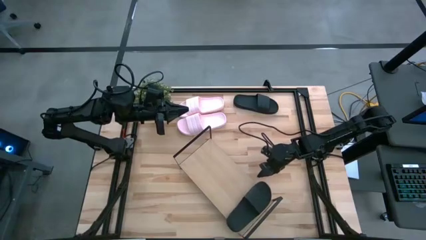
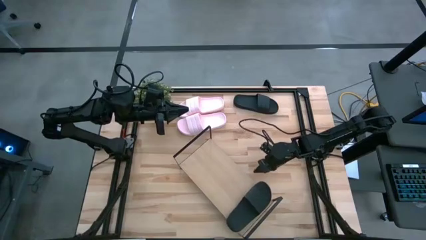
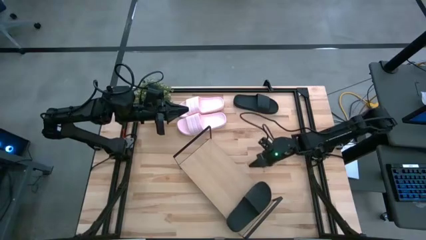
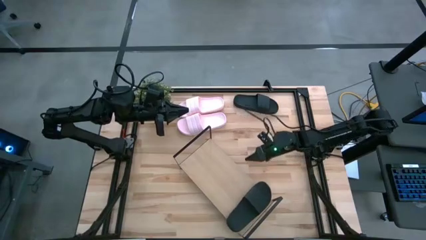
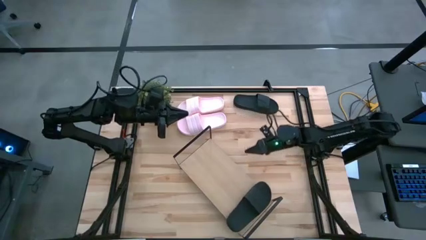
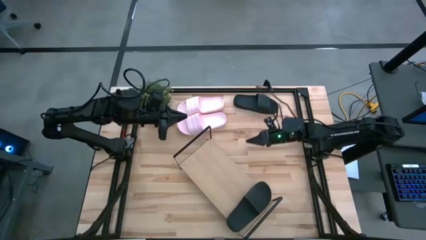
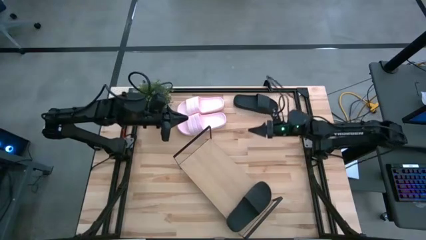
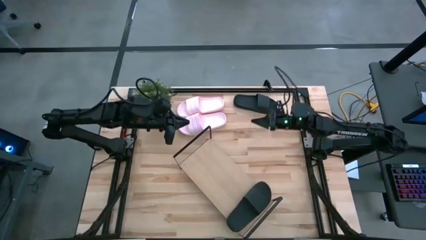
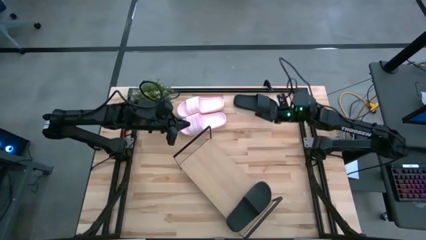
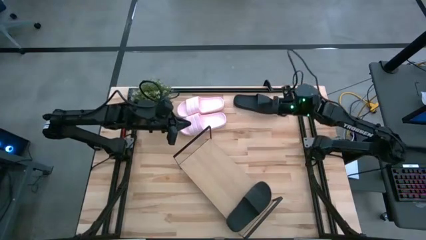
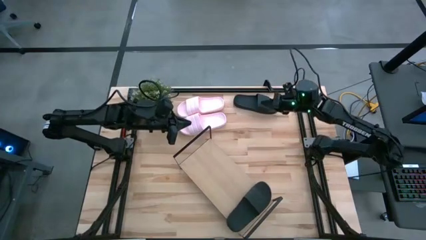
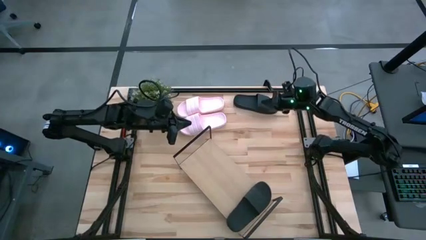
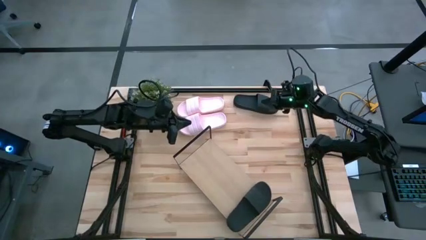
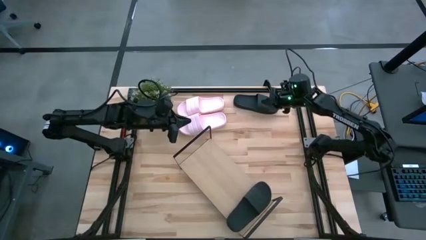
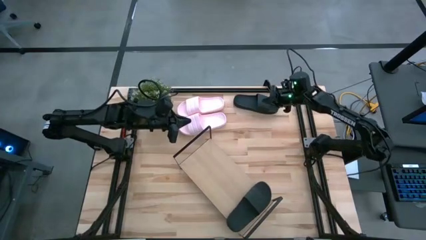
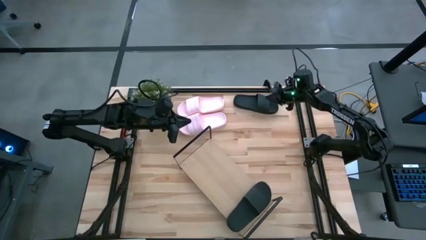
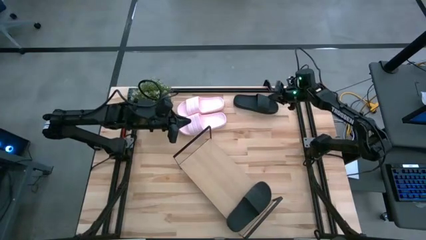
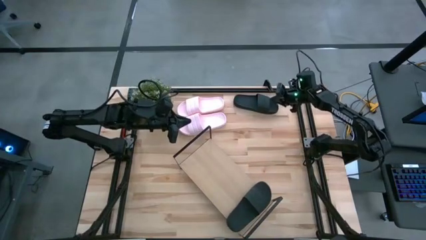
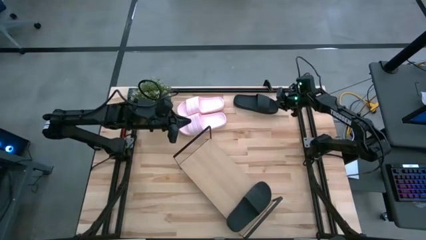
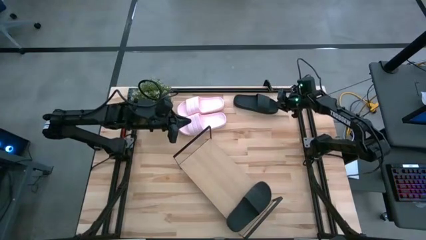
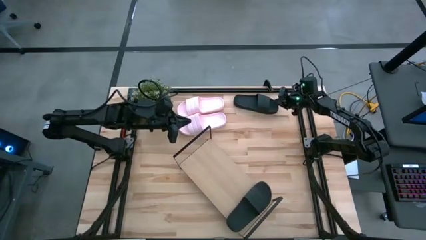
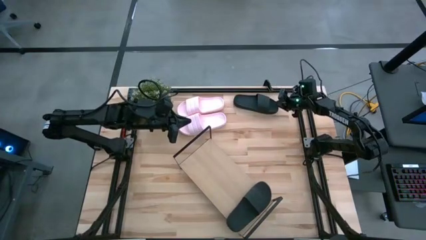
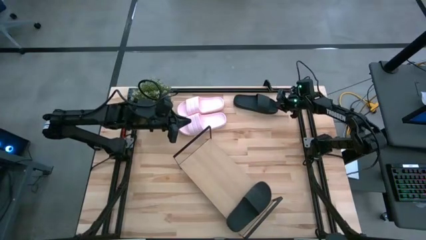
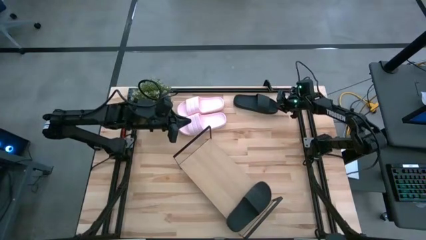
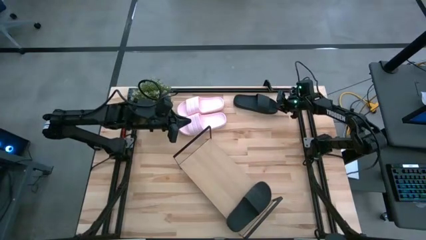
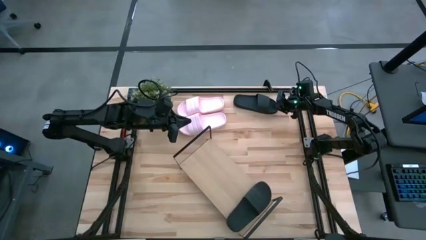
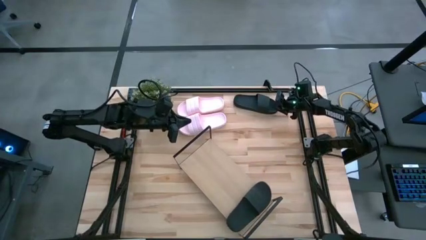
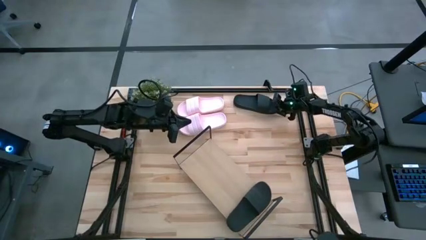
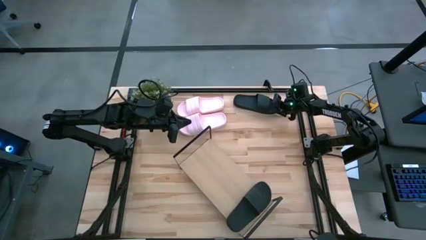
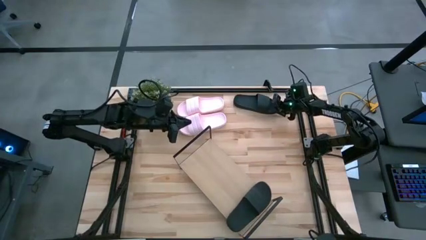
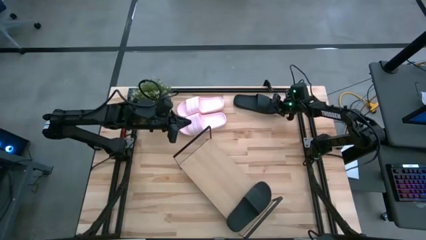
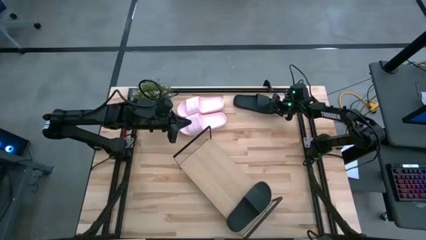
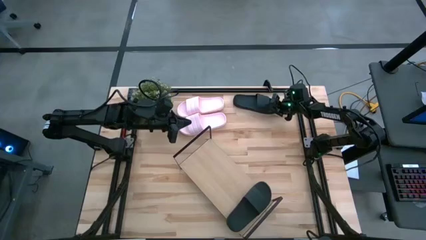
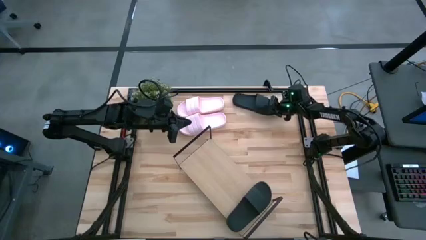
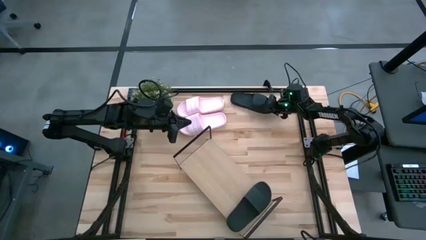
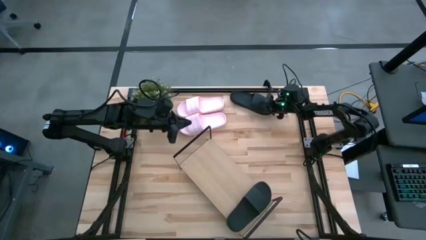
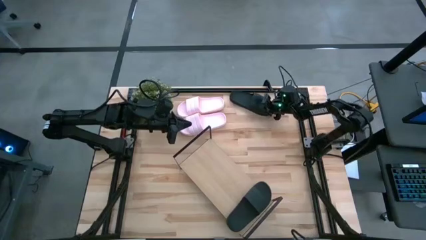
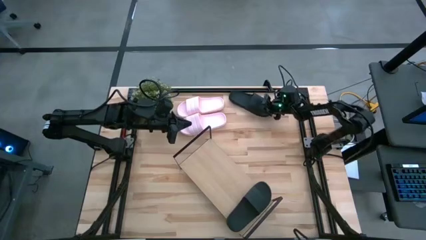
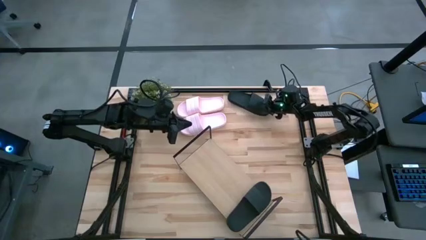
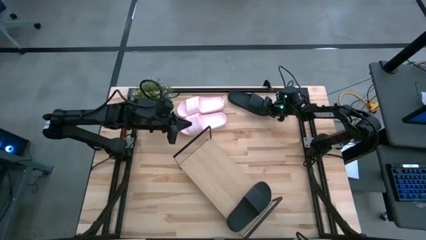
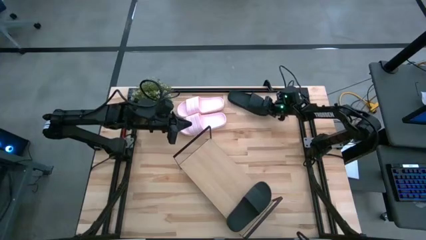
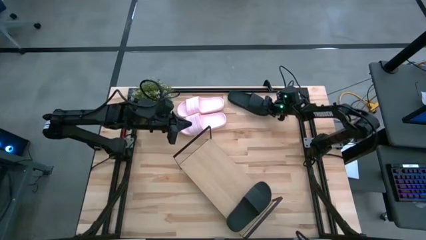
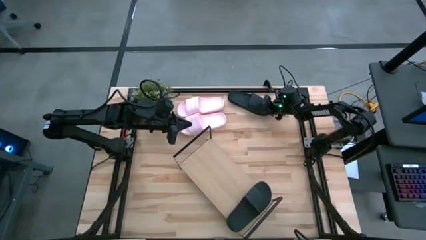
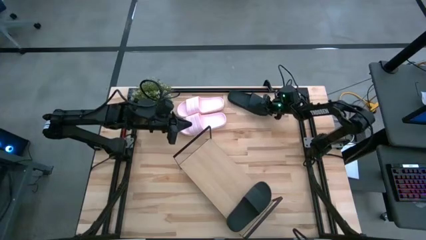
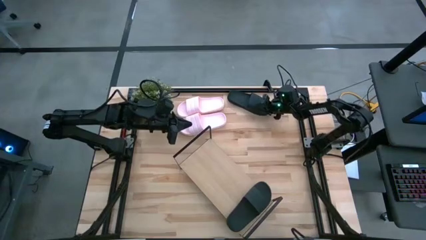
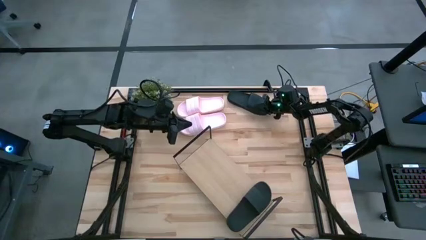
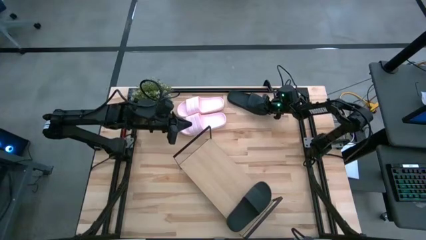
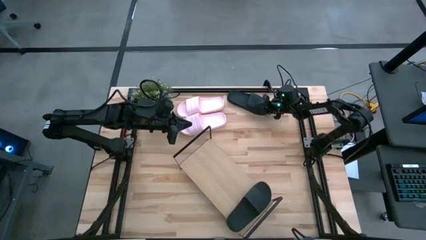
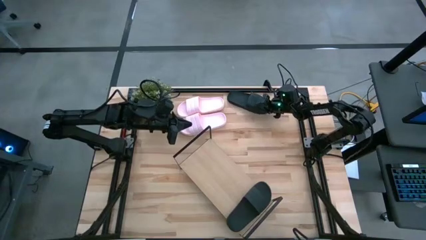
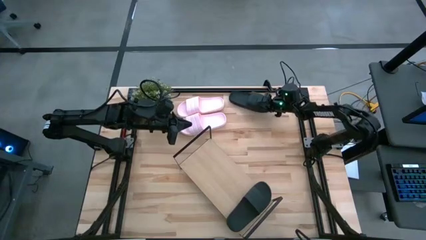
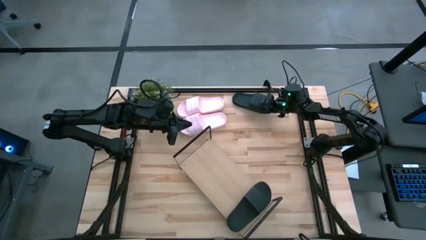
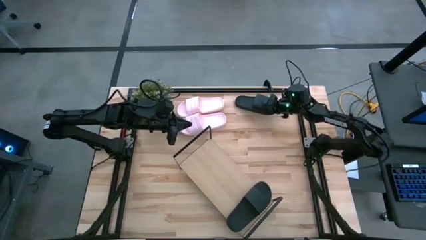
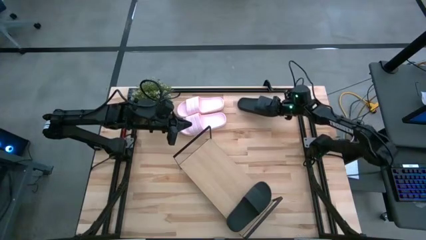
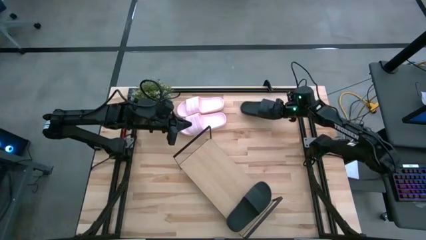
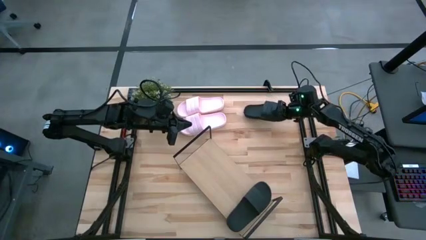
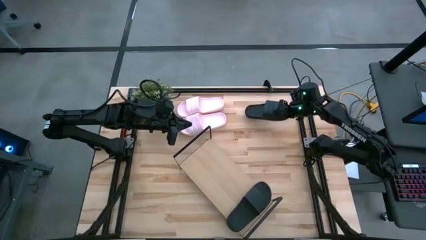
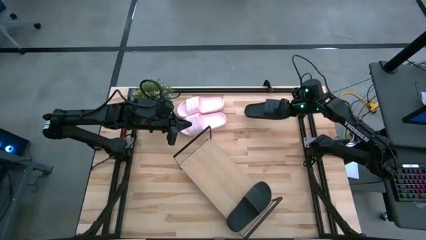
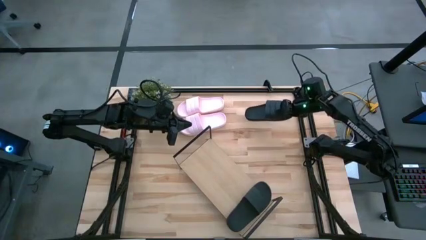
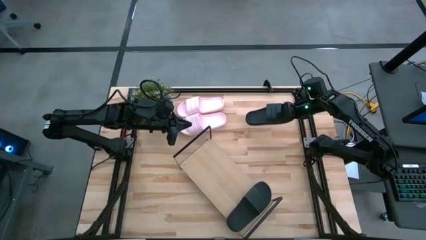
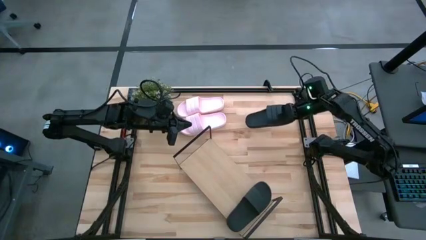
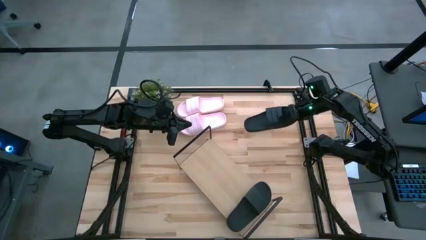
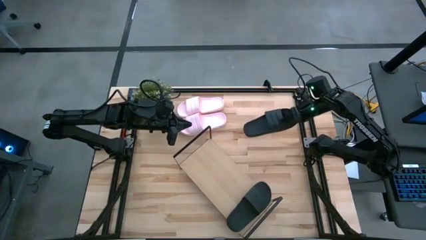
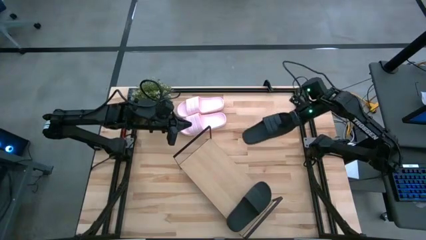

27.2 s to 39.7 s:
Task: Pick and place slides into the shelf
Put the black slipper on the shelf beside the other black slipper

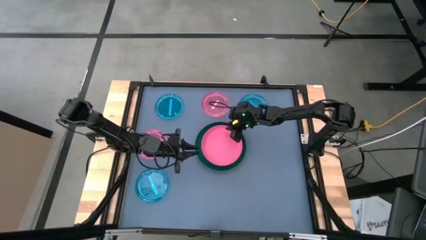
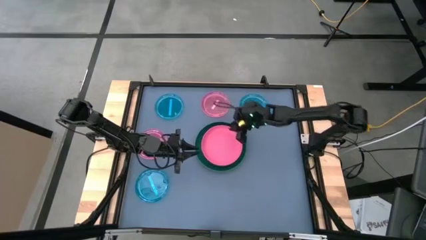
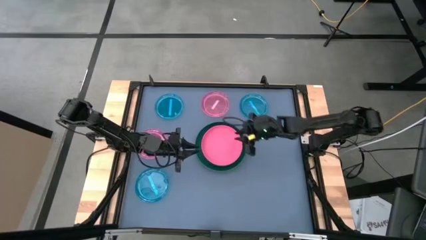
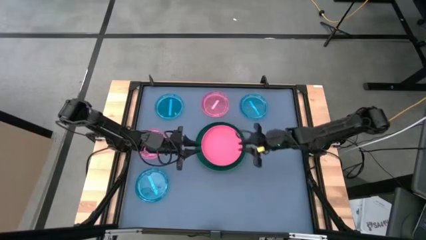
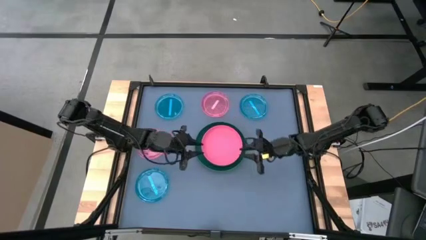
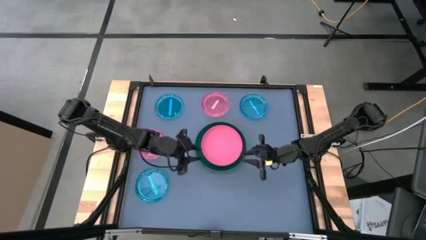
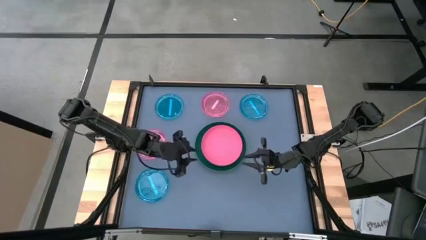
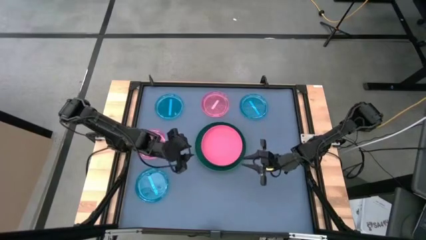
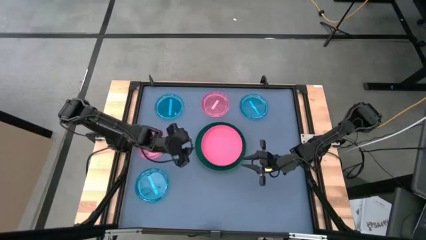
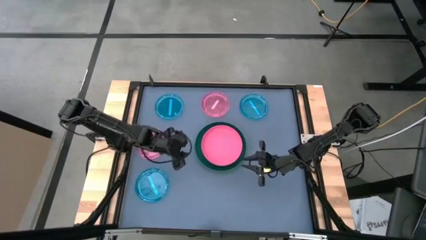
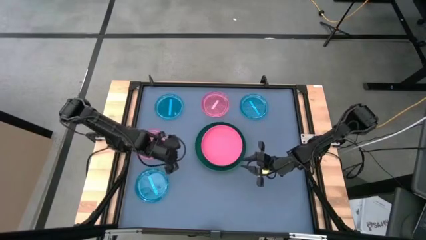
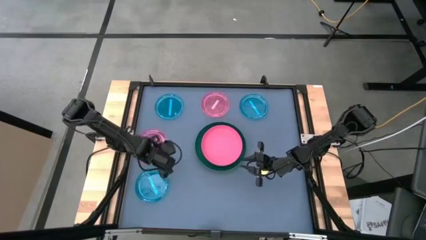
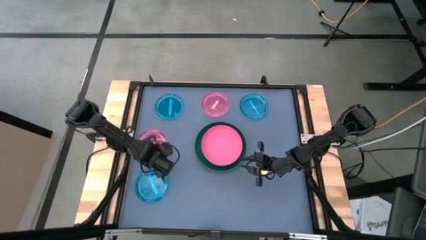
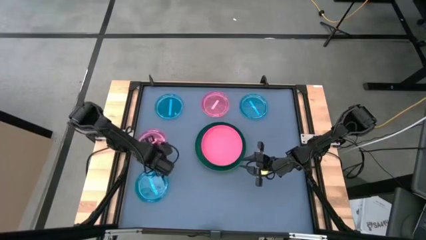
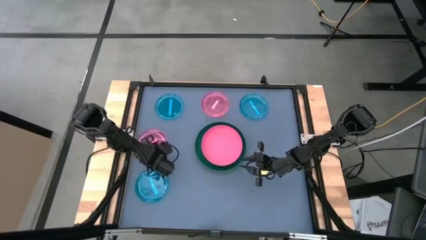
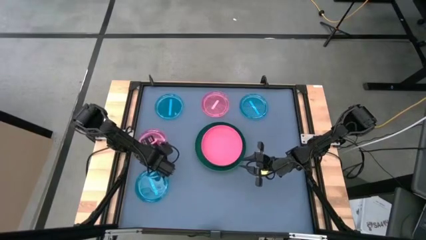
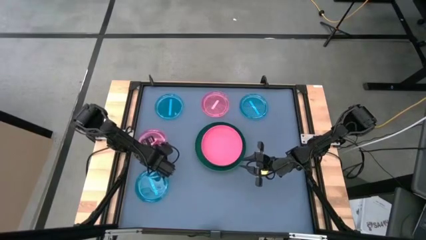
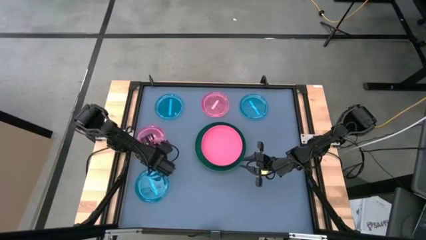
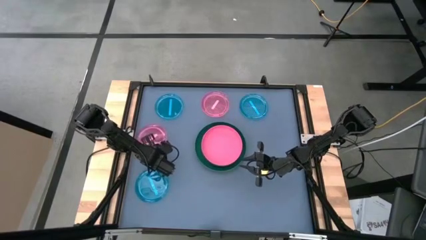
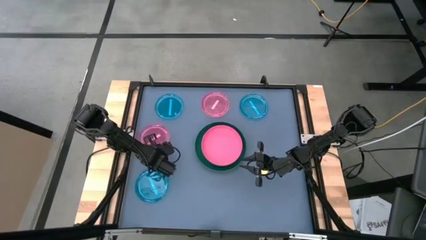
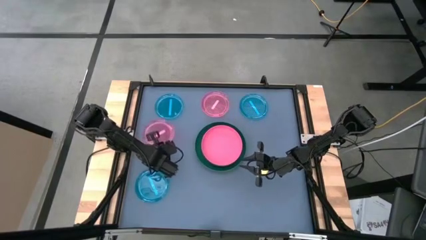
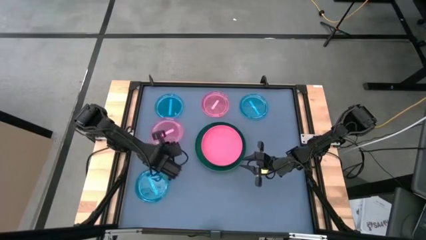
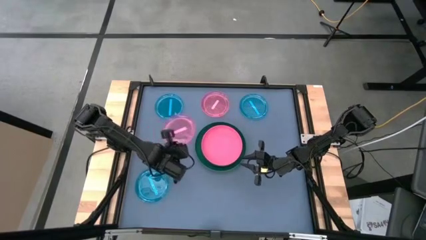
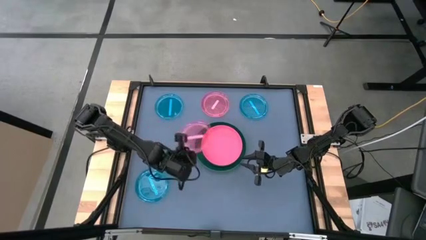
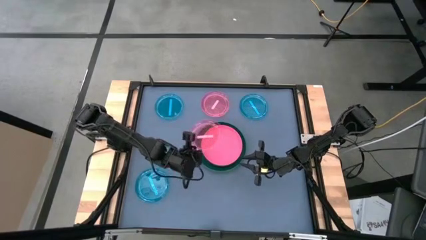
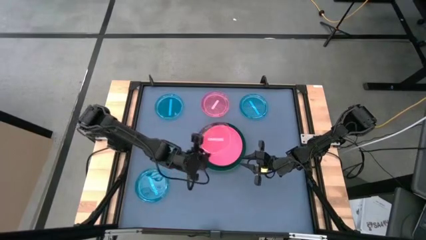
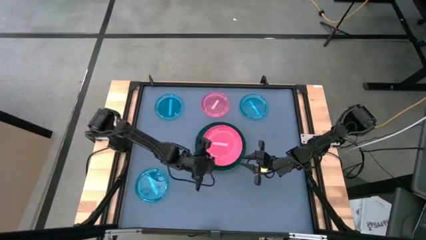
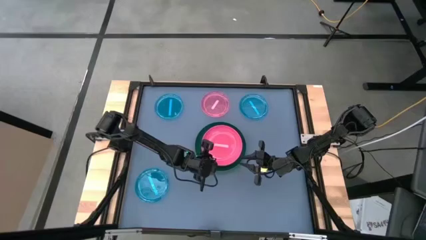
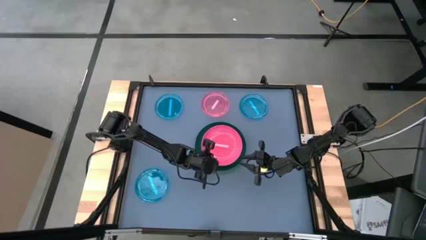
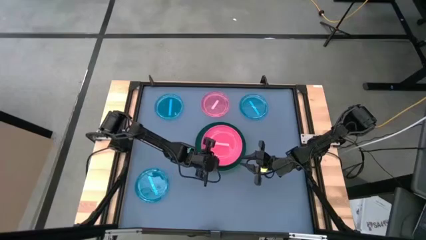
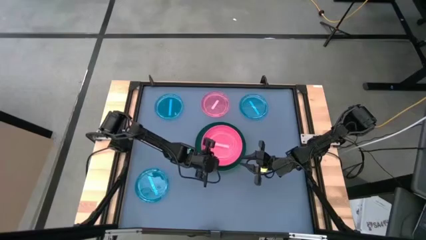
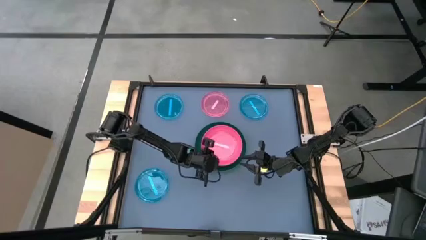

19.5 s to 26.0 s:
Task: Stack plastic plates
Stack the light pink plate on the pink plate
